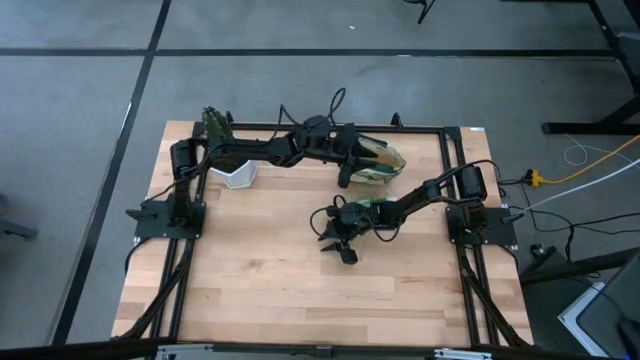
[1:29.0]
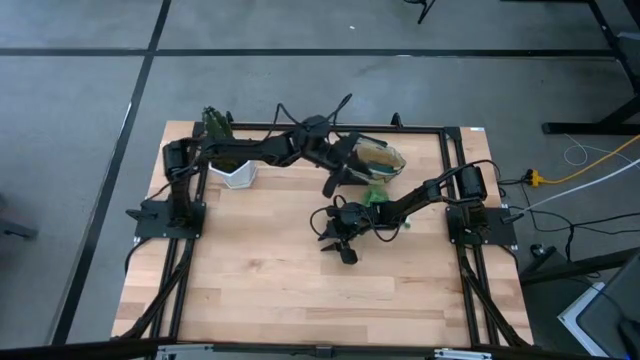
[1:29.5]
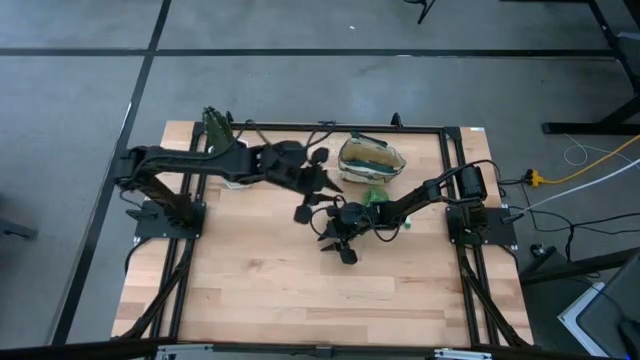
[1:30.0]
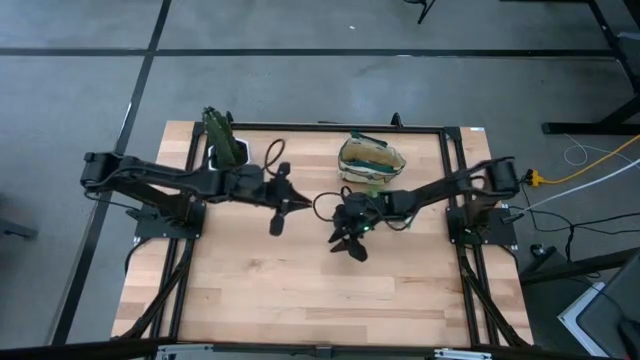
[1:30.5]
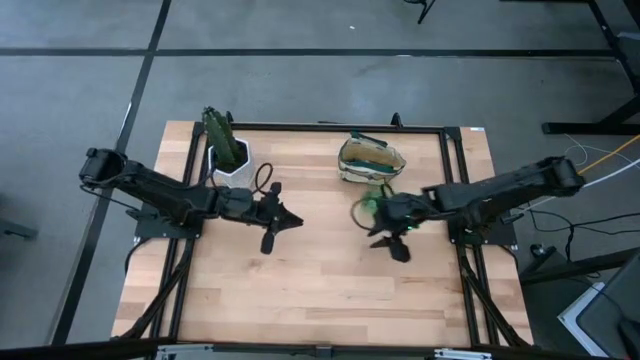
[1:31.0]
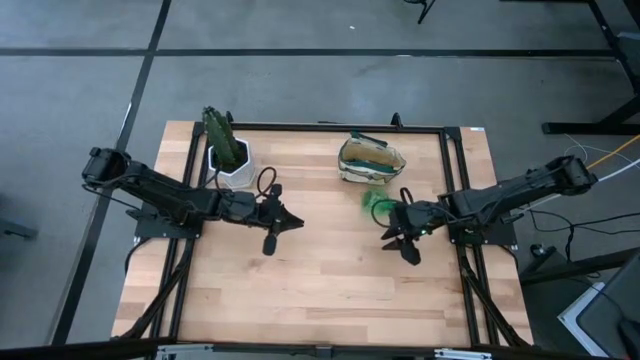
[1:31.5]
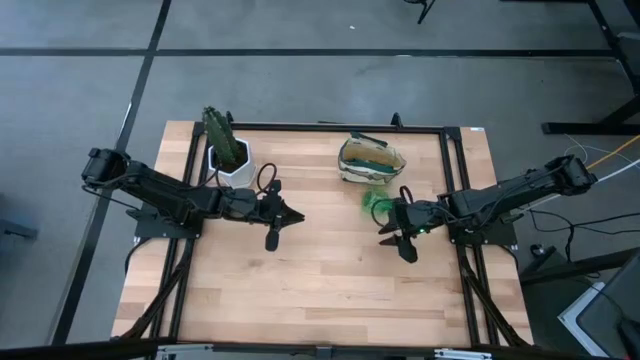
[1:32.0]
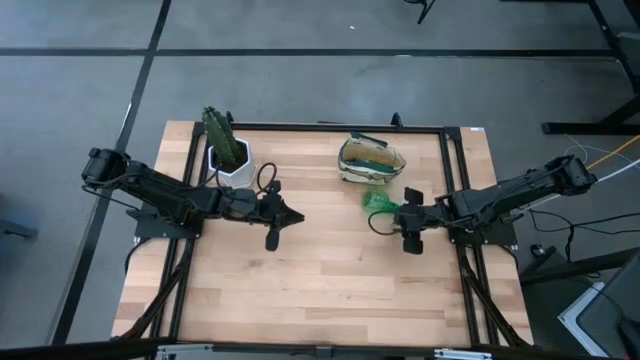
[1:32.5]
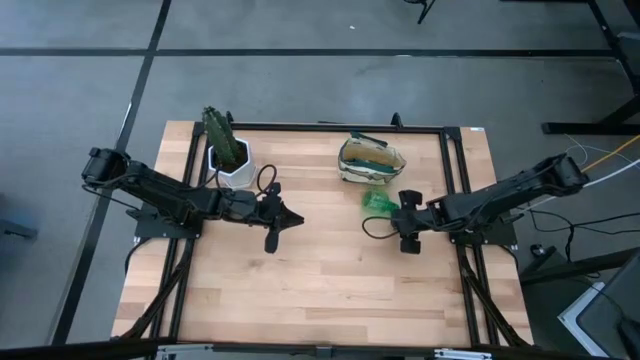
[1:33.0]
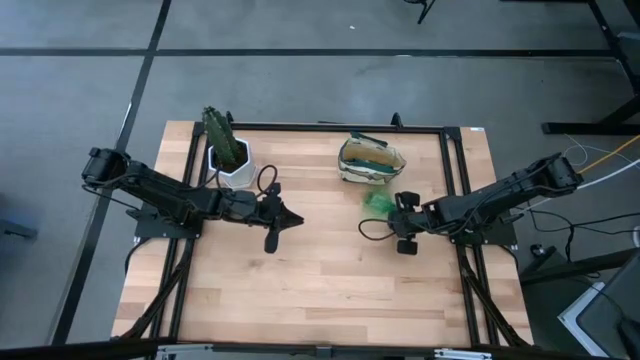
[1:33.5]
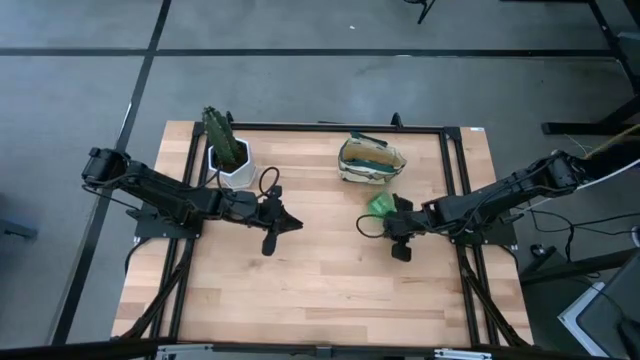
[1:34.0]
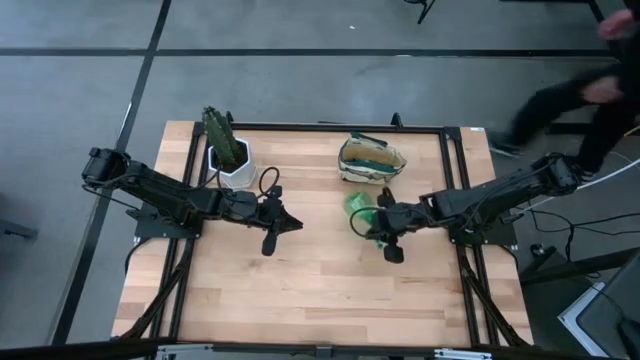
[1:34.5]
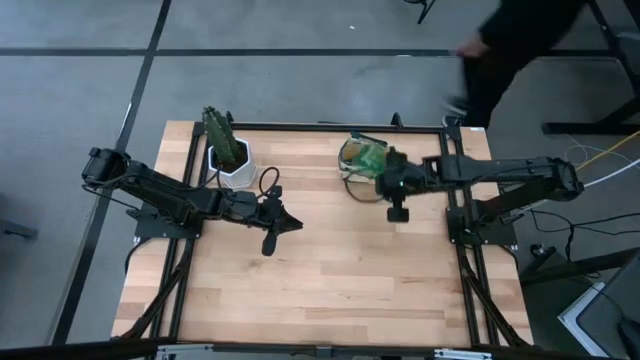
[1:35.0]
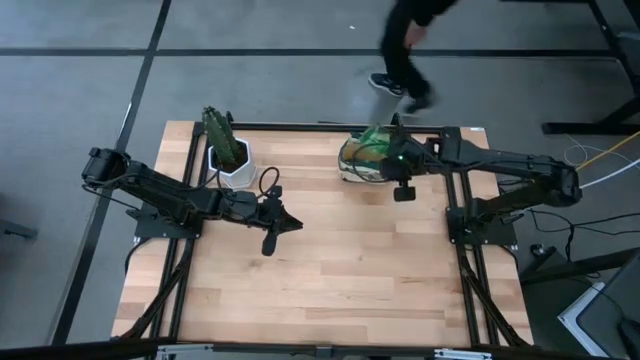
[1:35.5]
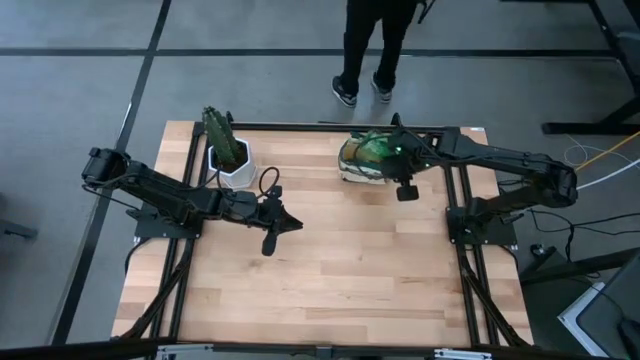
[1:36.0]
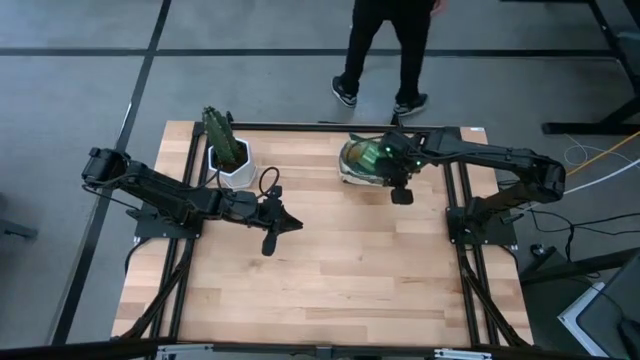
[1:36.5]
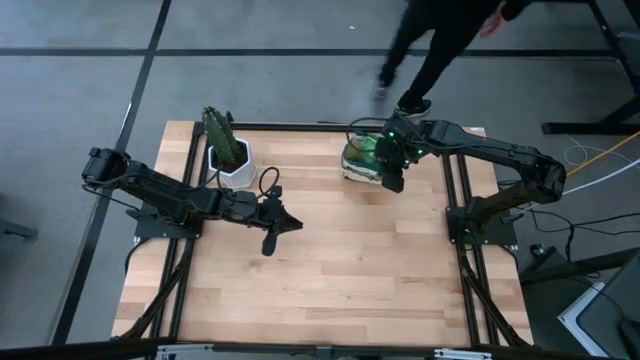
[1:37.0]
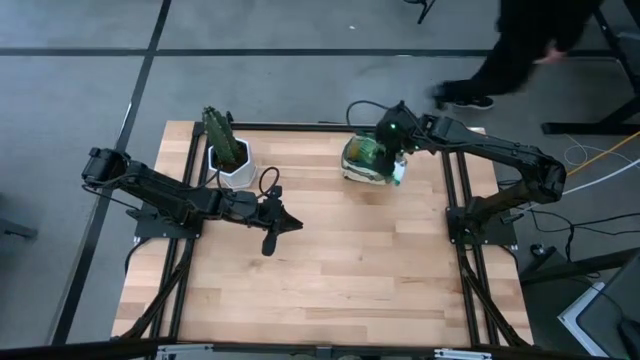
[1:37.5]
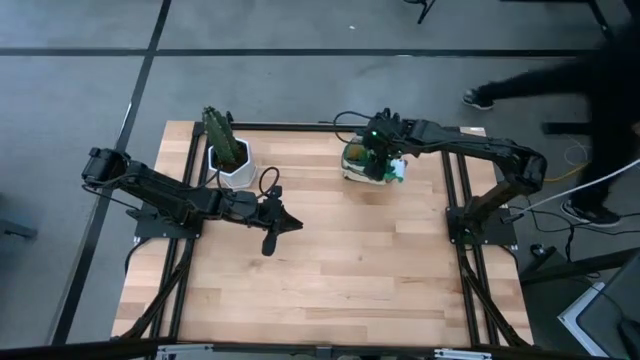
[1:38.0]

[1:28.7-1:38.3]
Task: Pick & Place Garden tools in Gardening bag
Put the green spray bottle into the brown gardening bag

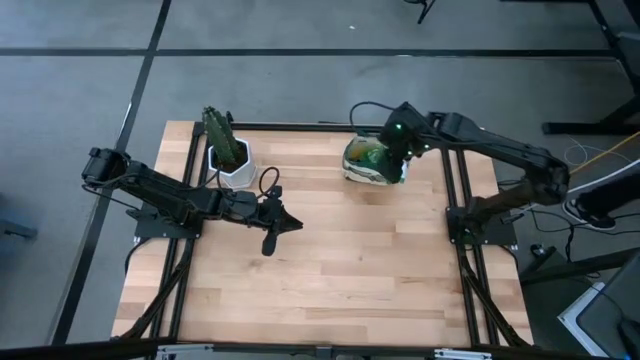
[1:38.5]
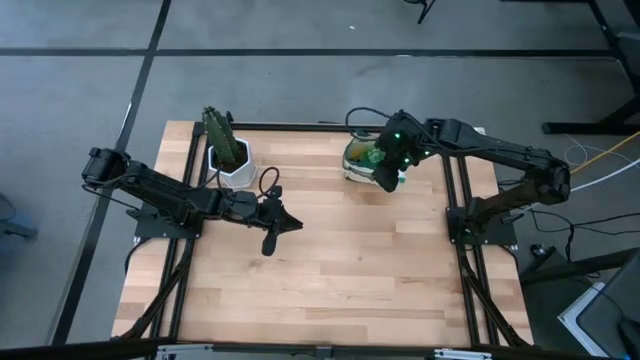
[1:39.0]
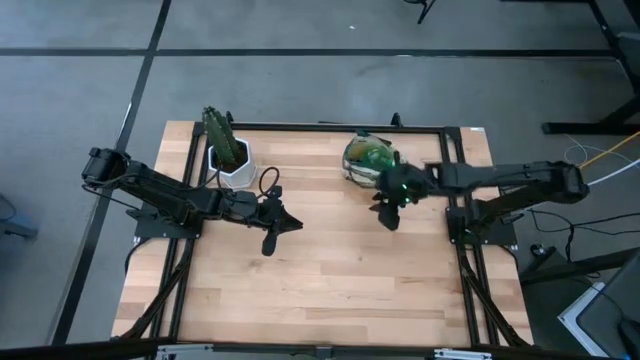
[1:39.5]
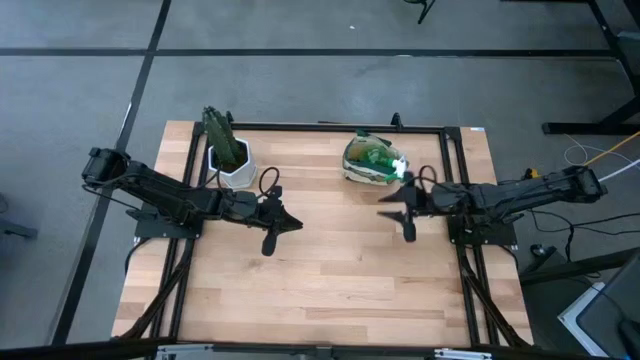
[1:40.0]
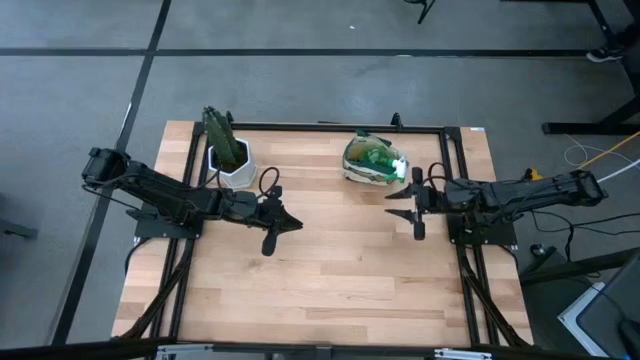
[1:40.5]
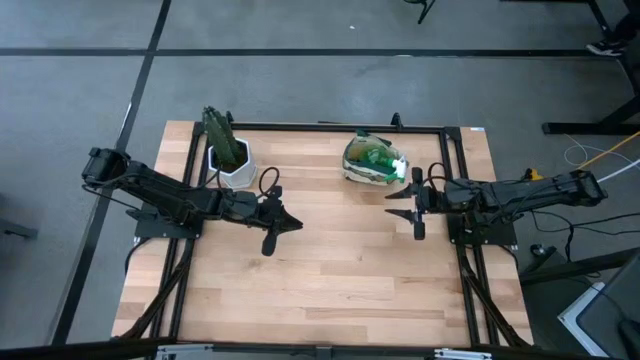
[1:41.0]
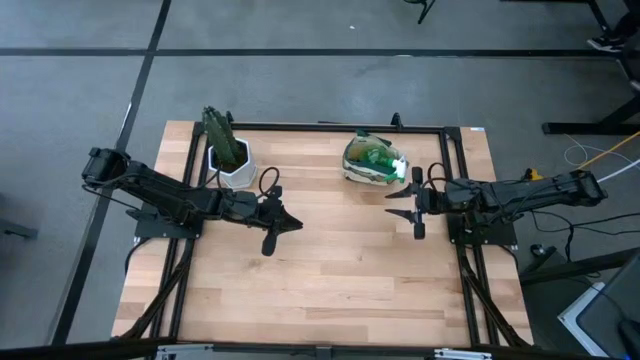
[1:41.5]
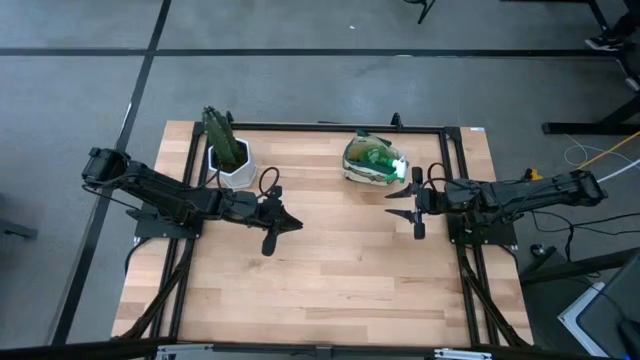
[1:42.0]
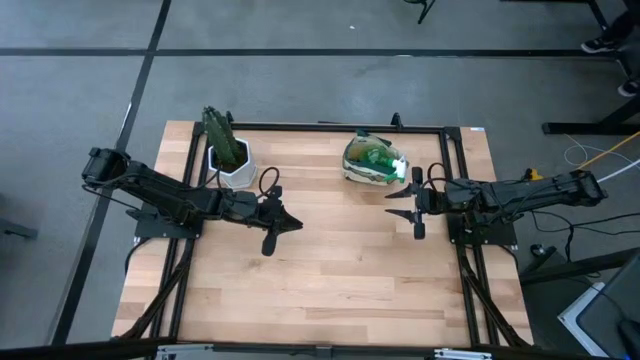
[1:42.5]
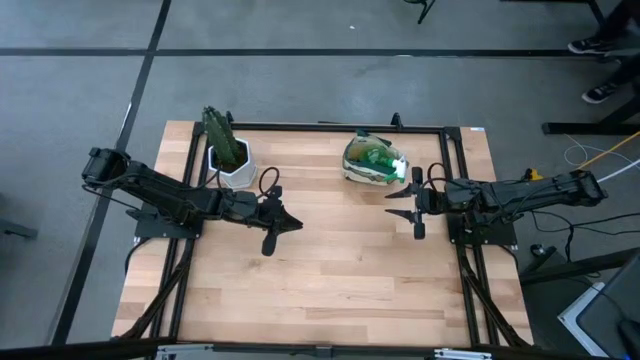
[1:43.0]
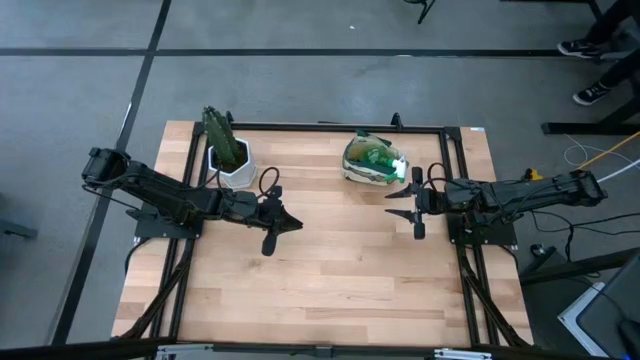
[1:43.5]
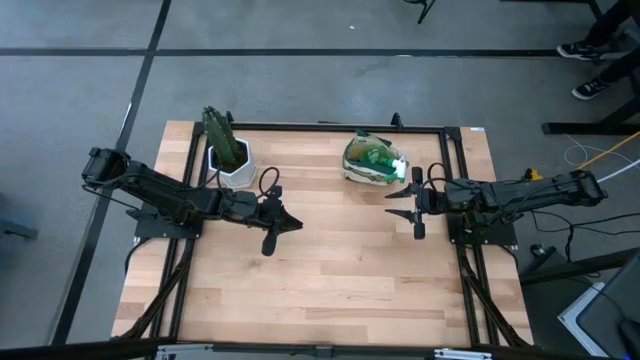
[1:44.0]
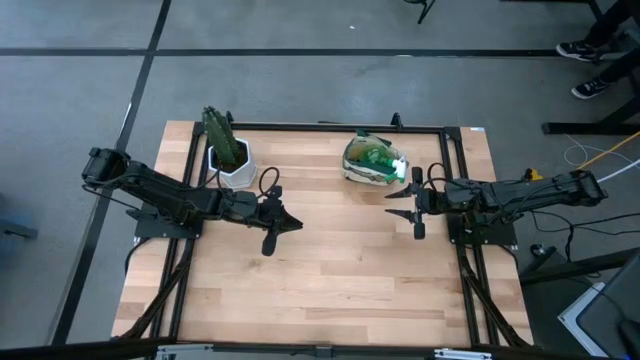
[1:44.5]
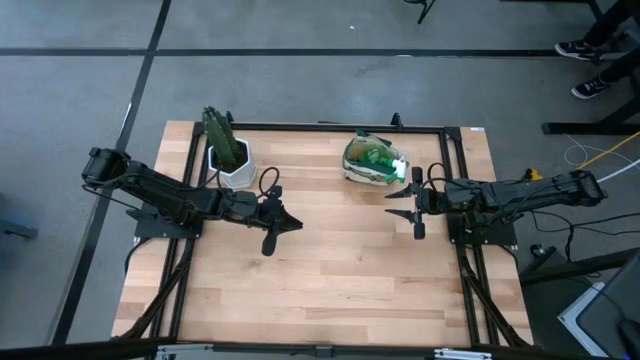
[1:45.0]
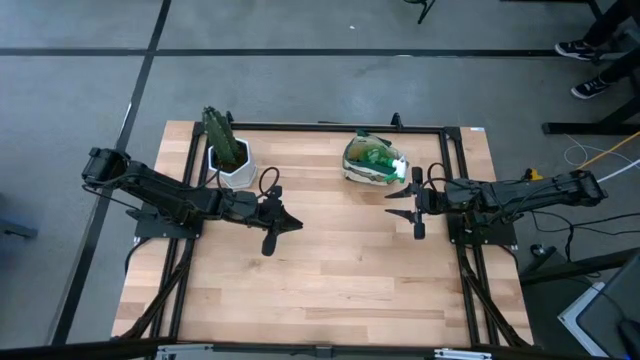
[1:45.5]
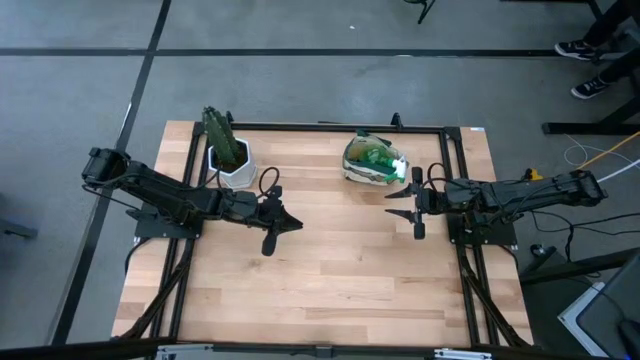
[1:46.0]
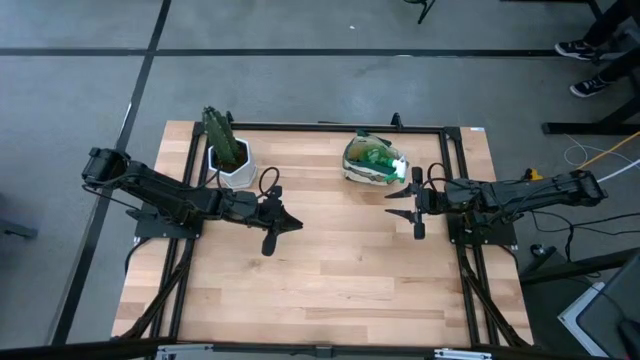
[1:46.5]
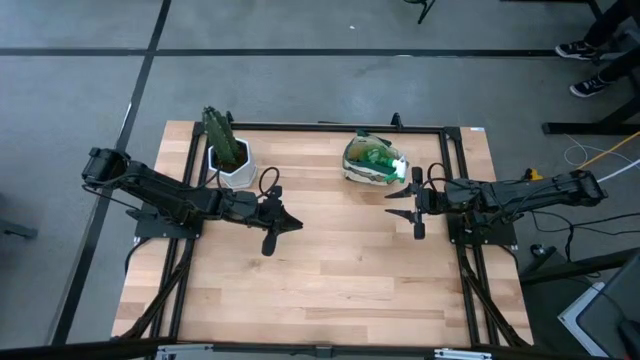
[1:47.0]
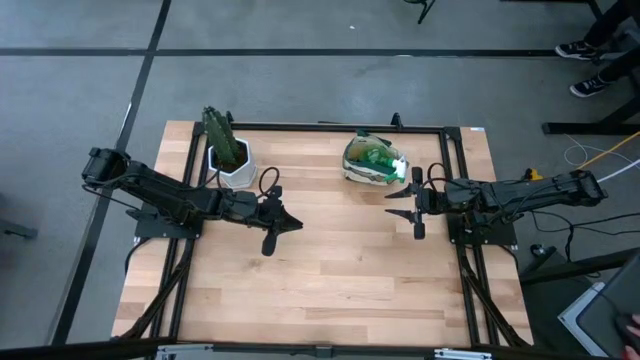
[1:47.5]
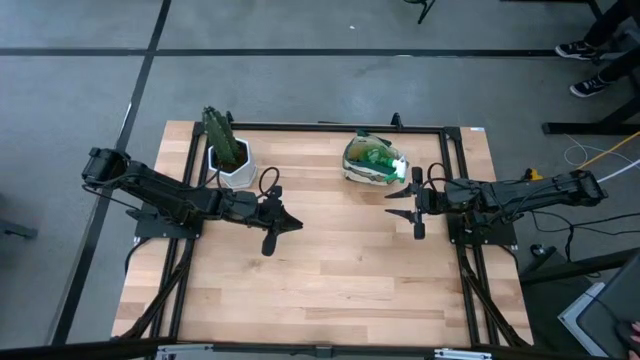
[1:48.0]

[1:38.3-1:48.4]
Return to Home Position

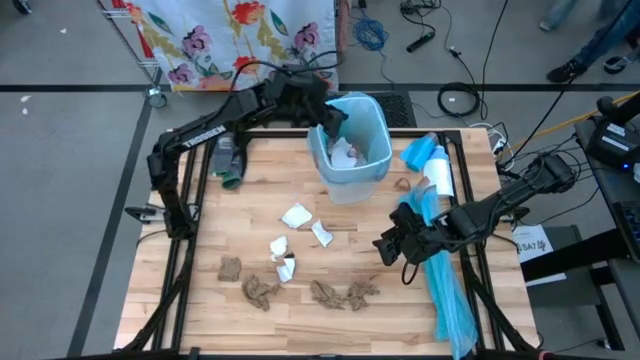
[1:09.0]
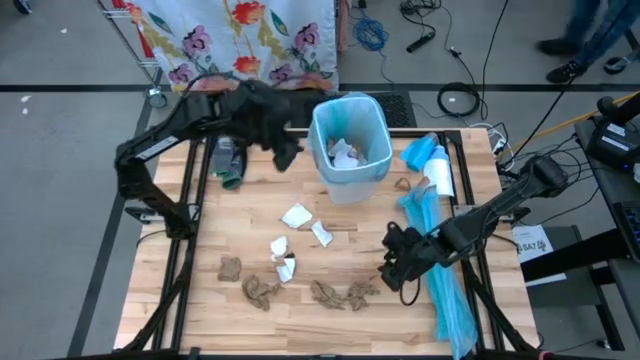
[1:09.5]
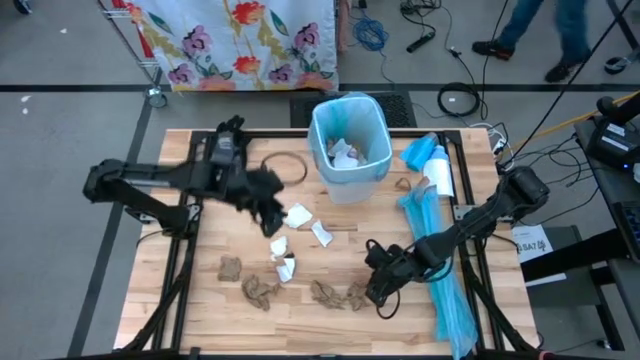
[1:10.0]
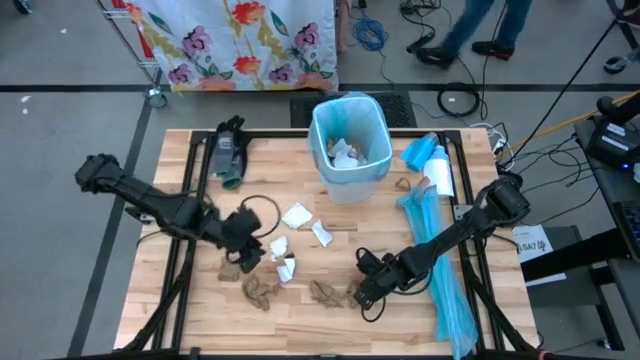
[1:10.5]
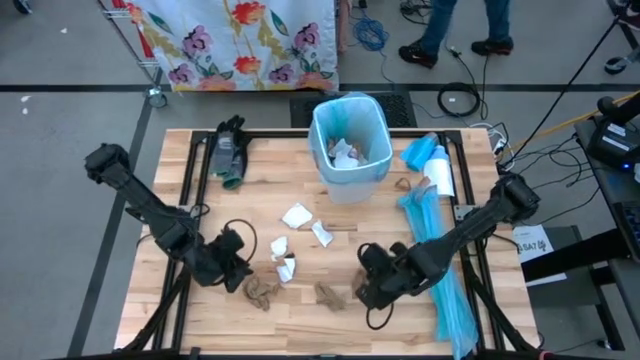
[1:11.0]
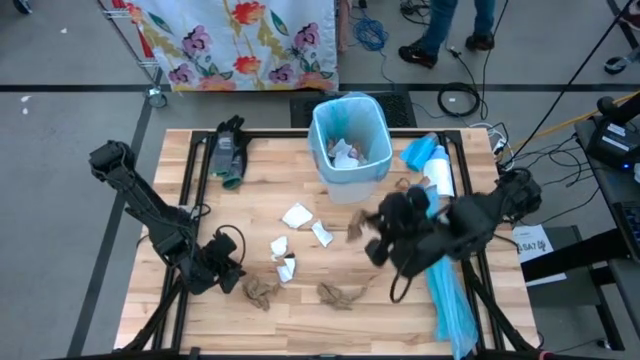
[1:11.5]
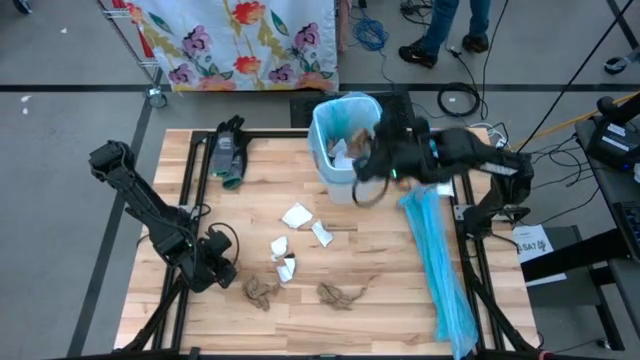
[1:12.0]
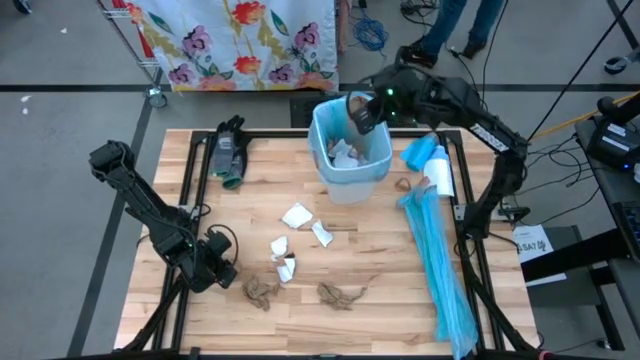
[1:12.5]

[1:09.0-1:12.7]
Task: place trash/remove bag and relplace
Put the brown napkin into the trash bin
